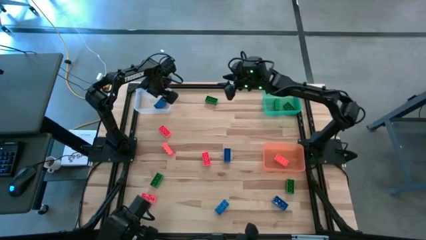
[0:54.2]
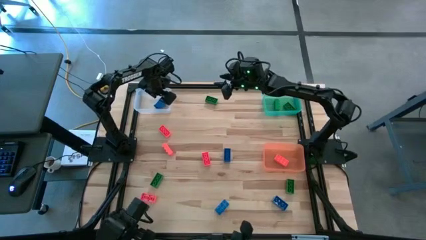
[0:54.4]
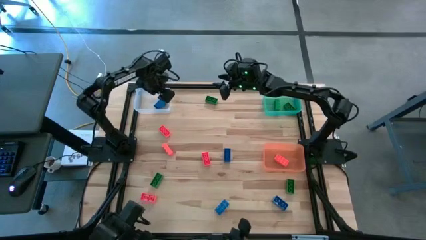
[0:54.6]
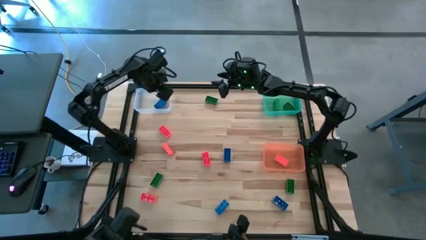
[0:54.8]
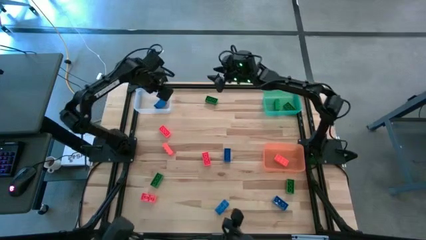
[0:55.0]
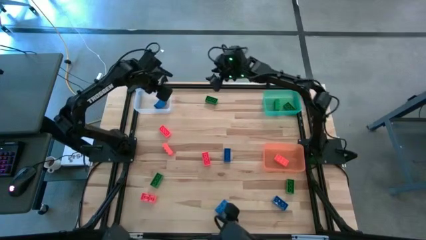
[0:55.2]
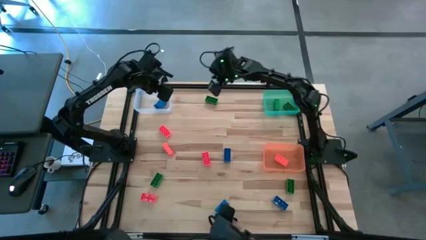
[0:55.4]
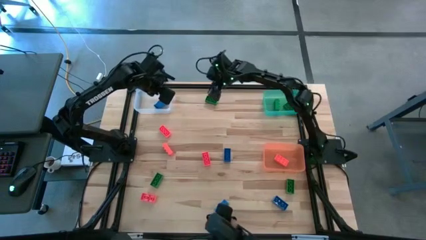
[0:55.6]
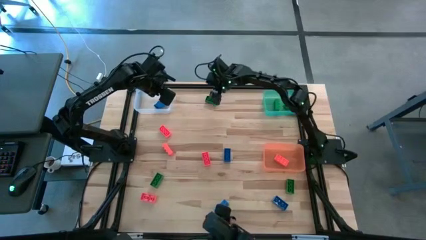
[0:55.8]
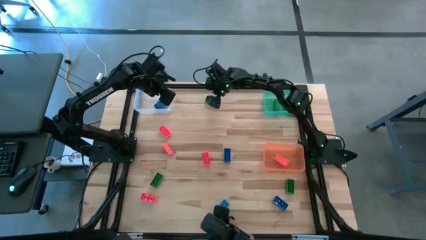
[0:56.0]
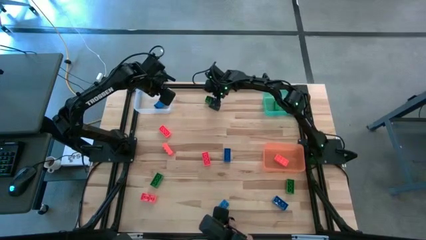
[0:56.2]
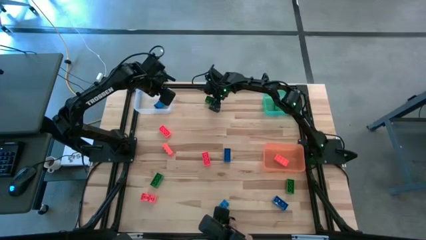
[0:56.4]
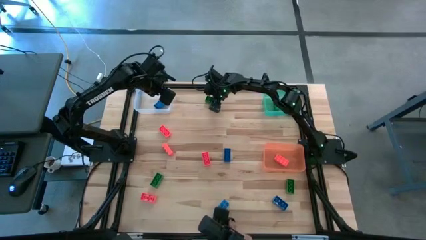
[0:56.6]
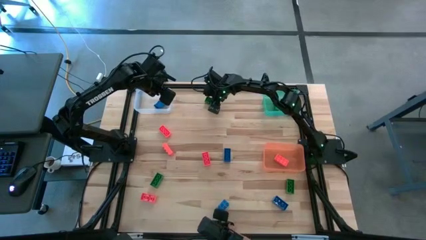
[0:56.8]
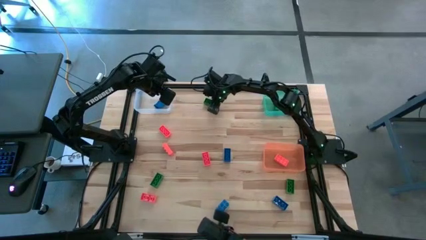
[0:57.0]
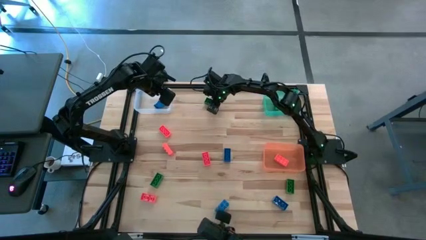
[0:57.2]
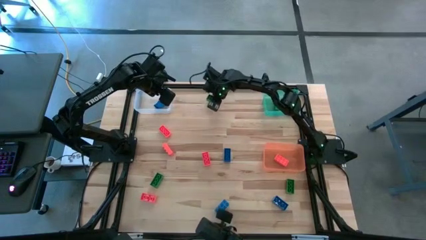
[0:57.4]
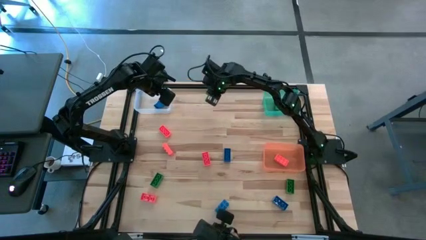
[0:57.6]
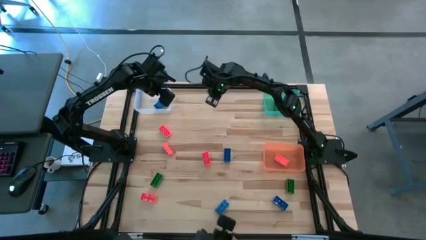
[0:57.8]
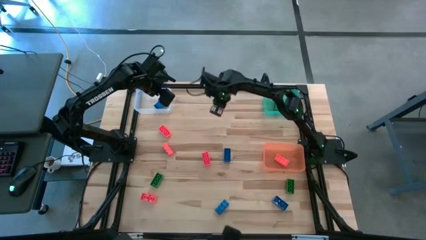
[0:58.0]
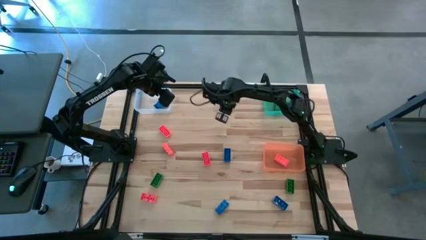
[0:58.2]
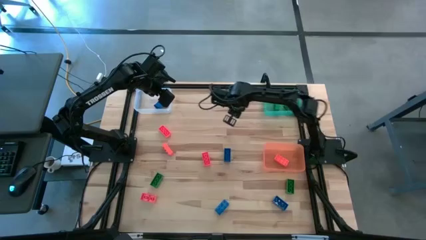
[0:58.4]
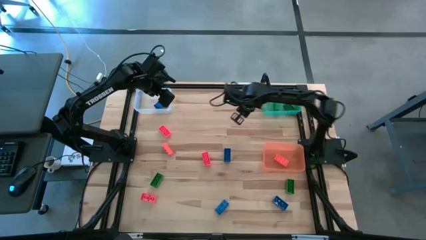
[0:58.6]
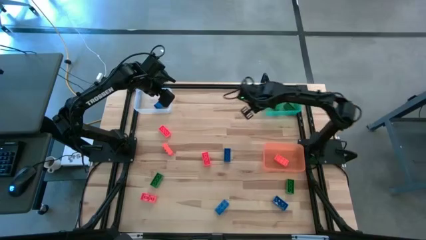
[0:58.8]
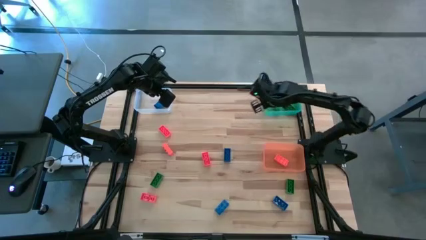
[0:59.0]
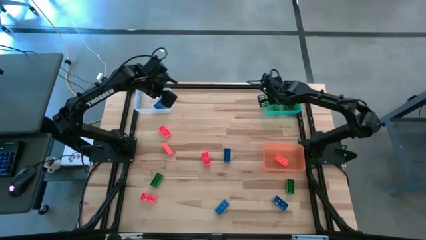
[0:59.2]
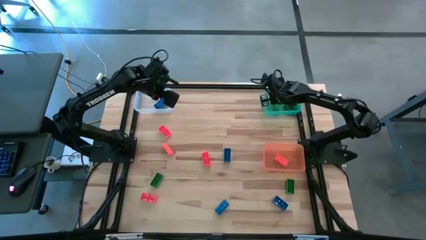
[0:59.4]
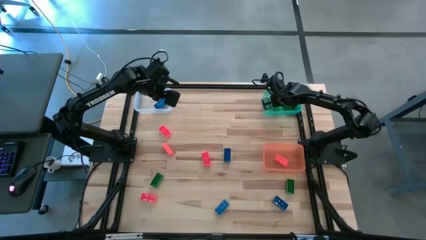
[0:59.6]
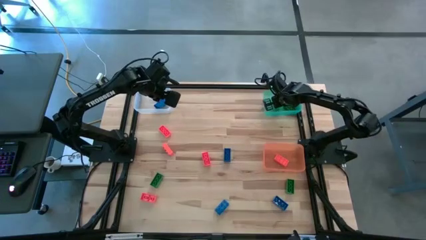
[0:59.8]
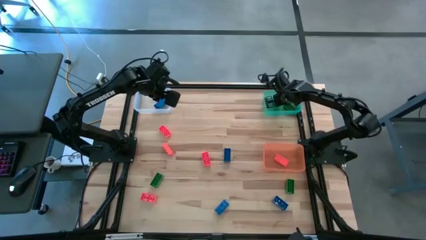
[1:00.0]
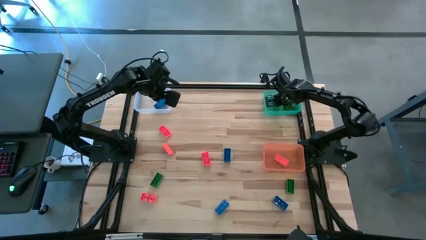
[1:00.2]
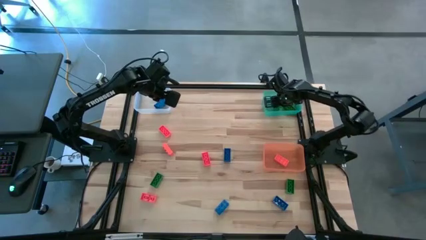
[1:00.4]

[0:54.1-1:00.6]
Task: Sort & place blocks by color
Put the green game piece into the green bin

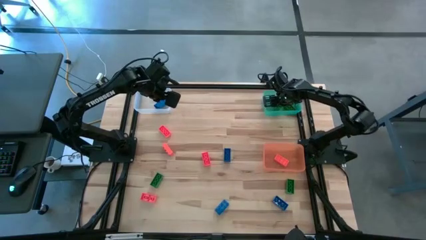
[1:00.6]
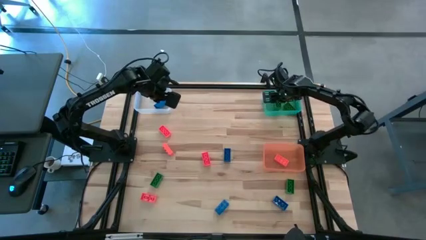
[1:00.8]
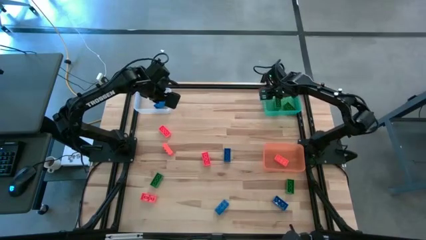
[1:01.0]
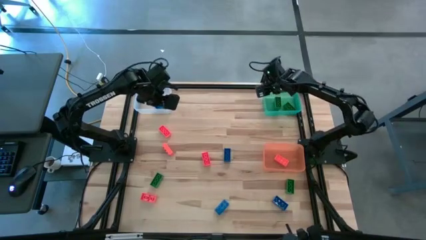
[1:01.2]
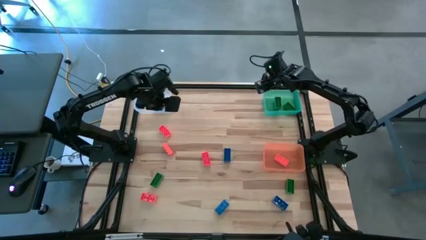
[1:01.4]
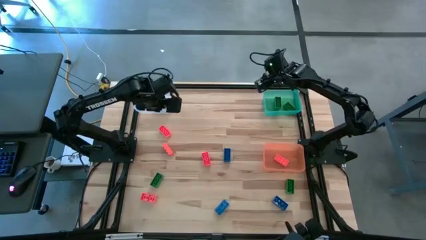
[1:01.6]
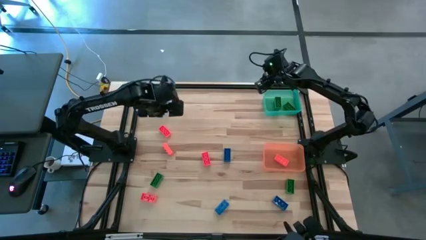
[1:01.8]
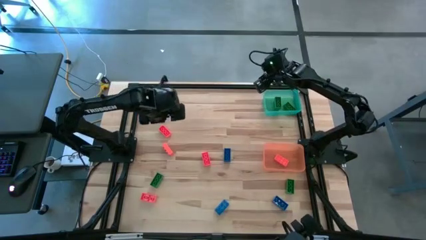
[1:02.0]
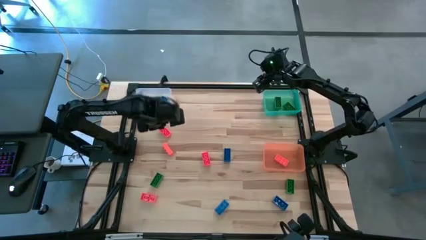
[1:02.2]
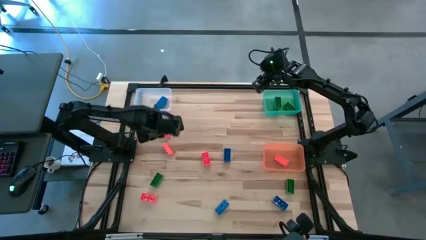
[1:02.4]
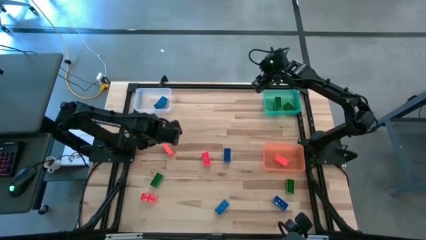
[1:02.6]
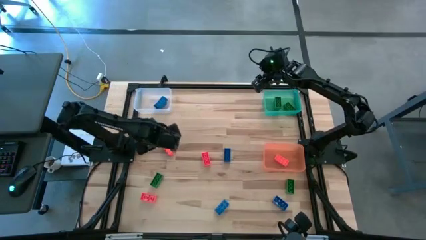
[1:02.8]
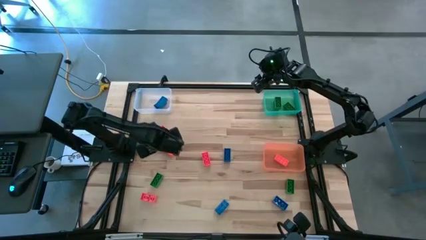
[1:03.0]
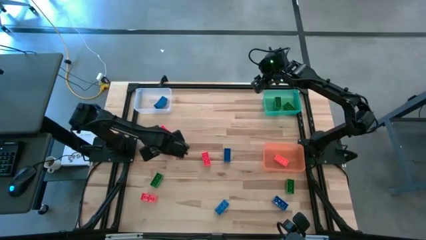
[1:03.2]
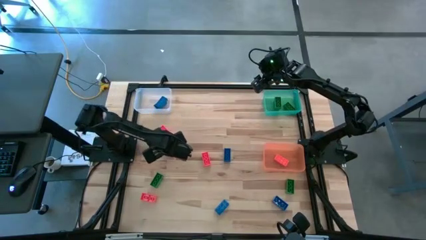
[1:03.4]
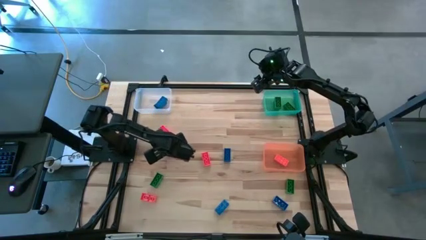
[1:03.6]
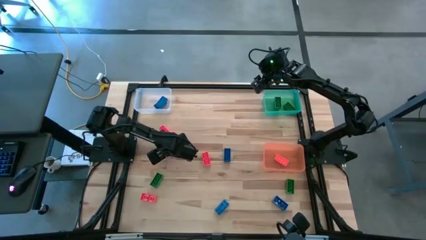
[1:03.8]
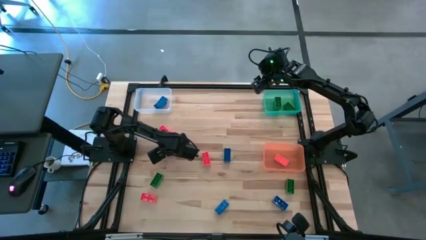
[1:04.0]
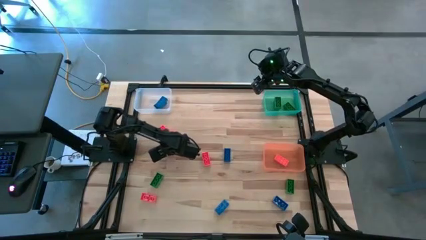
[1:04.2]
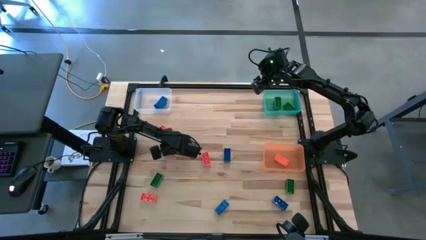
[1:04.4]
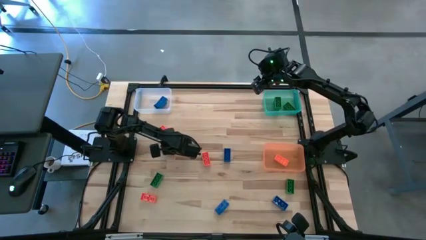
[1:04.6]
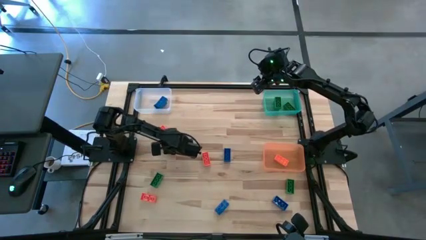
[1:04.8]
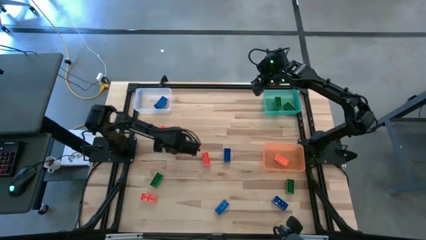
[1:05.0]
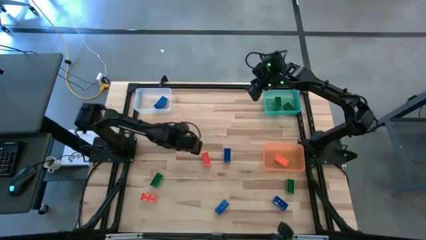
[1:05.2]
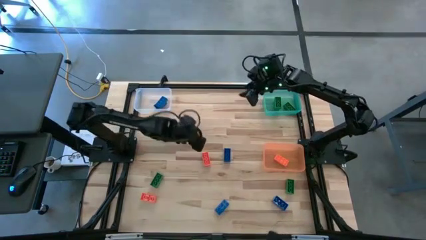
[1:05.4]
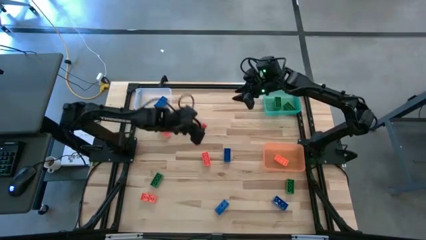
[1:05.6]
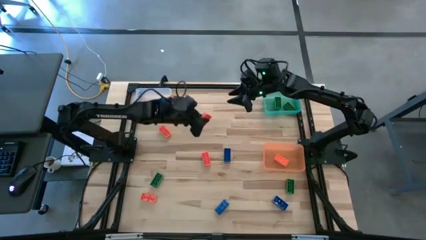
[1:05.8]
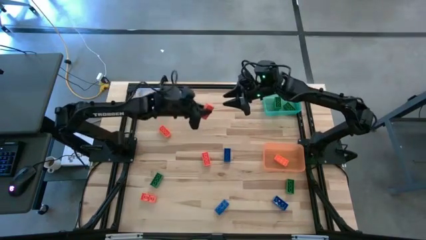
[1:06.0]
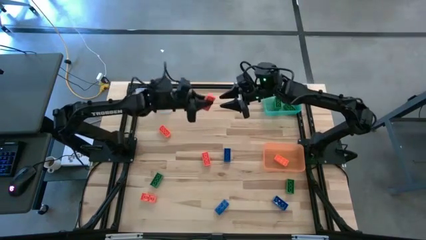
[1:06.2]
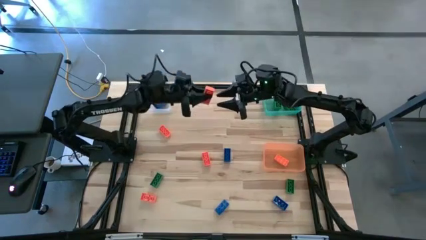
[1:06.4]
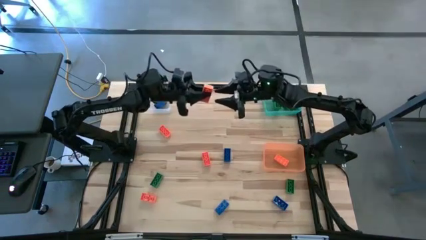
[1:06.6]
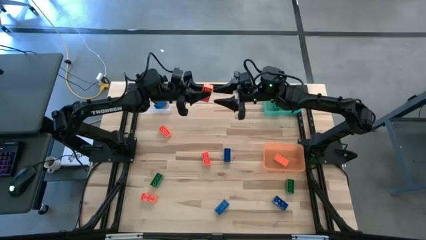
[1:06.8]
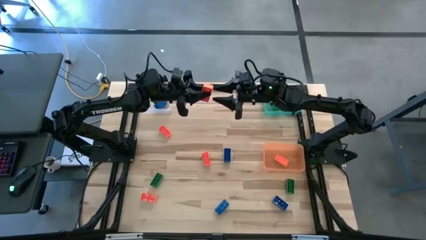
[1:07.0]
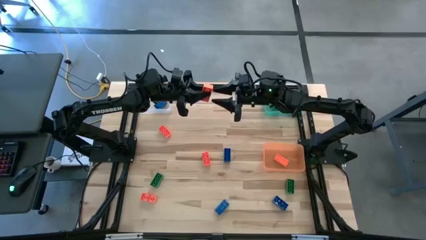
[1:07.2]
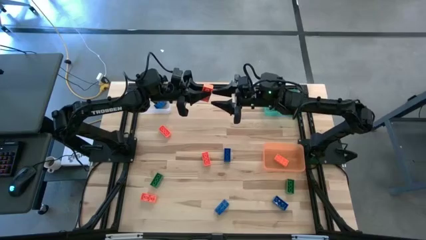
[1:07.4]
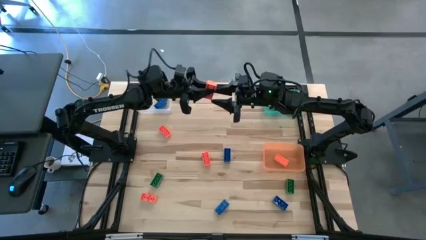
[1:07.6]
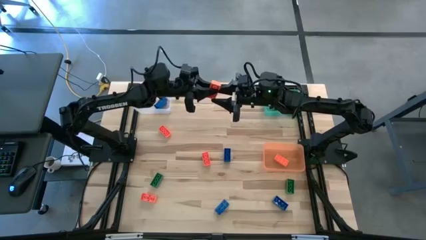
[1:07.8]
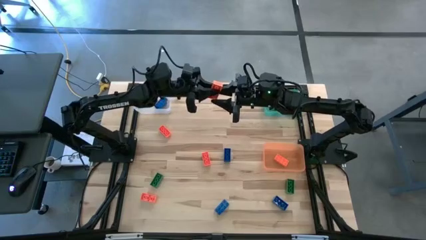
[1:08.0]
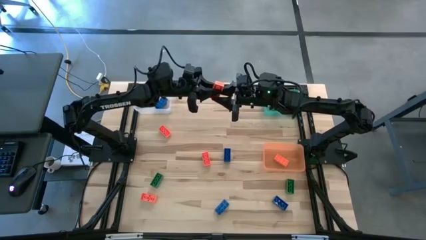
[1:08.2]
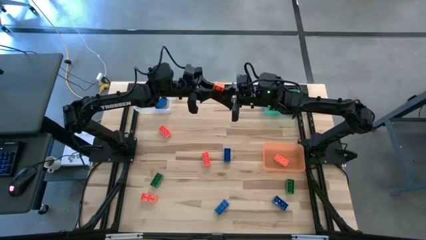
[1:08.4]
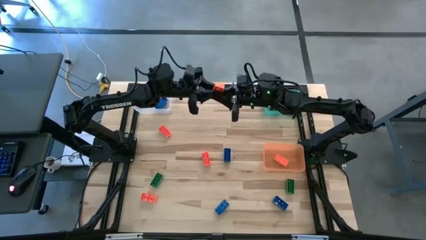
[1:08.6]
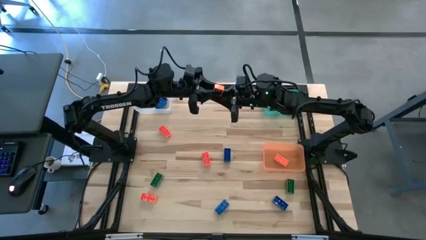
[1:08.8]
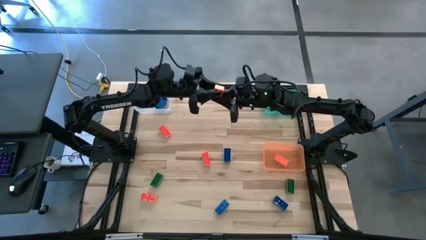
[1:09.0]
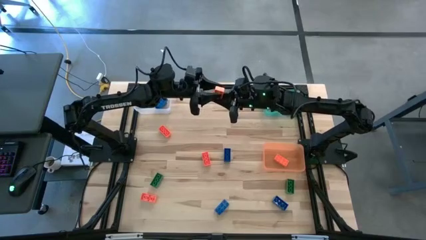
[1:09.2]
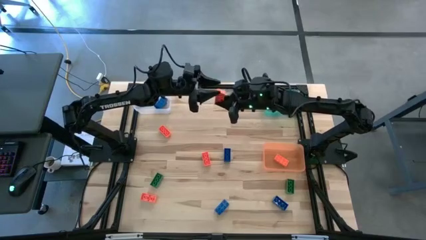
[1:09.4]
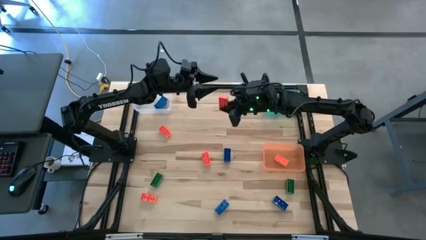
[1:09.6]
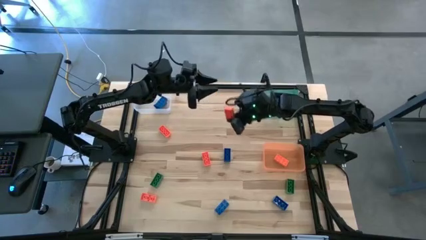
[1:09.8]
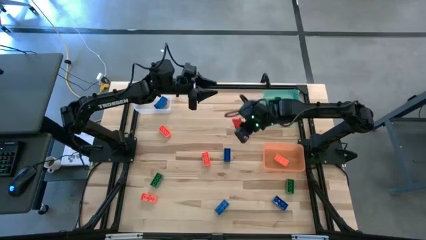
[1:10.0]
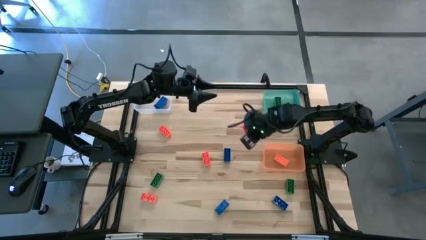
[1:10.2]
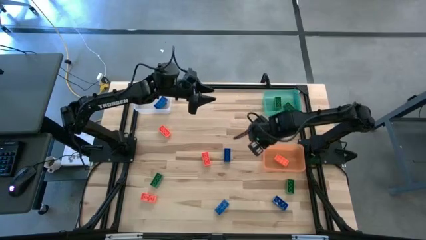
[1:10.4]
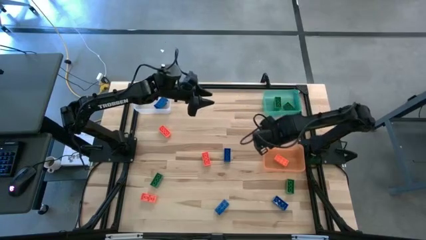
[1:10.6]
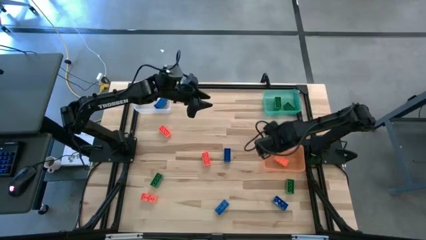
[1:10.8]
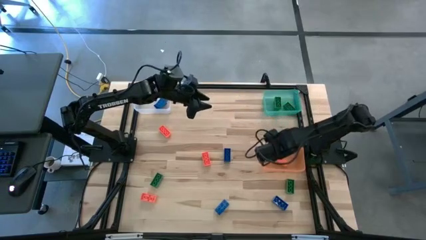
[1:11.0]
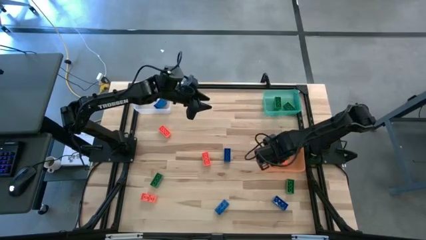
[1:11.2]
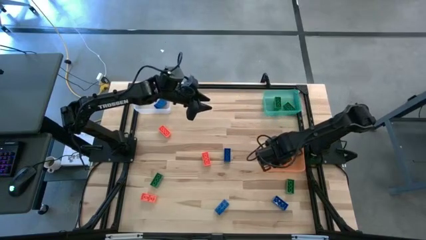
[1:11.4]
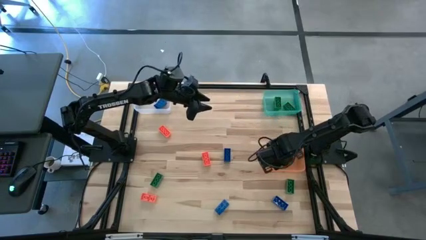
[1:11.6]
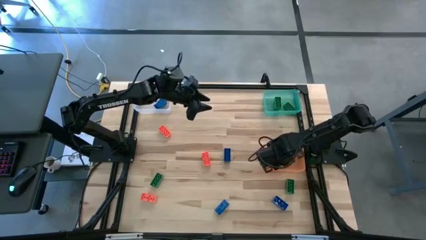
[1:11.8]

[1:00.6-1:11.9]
Put the orange game piece into the orange bin
